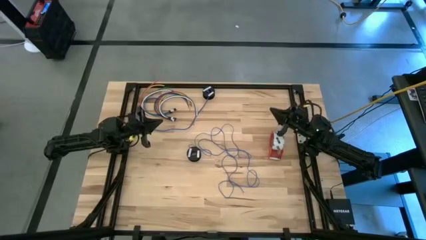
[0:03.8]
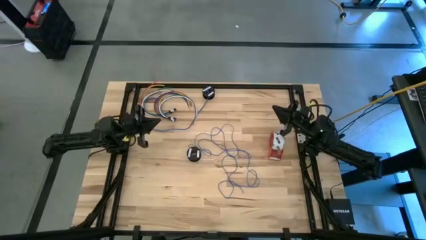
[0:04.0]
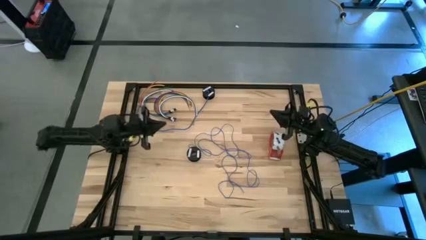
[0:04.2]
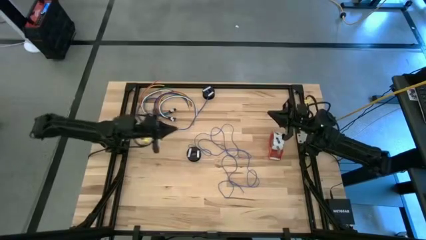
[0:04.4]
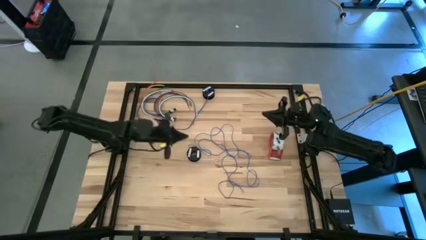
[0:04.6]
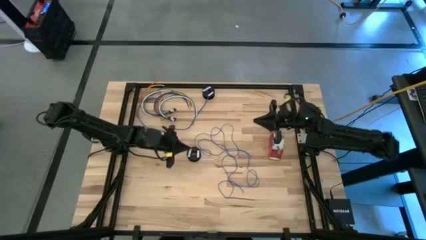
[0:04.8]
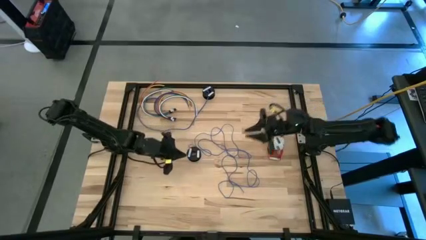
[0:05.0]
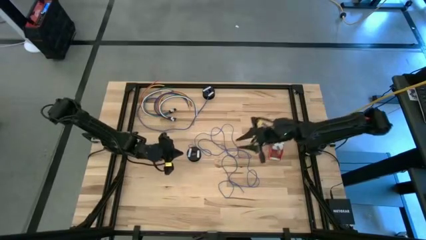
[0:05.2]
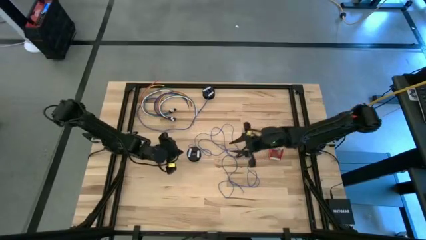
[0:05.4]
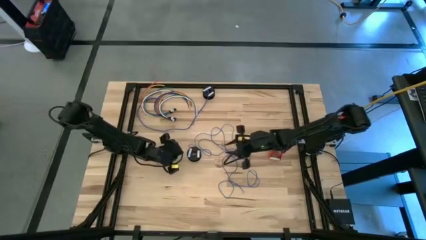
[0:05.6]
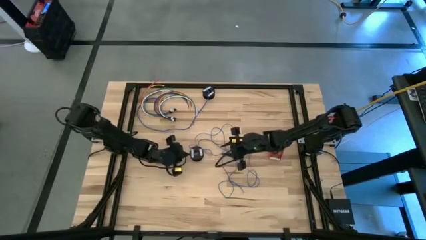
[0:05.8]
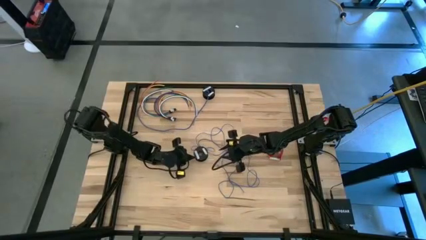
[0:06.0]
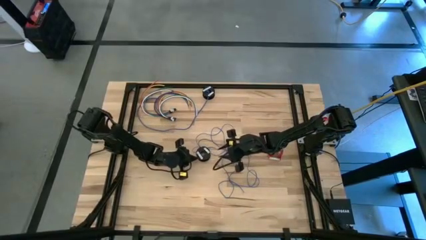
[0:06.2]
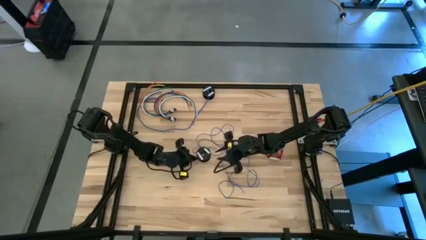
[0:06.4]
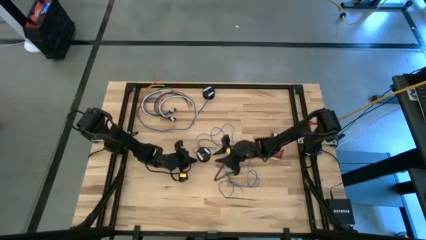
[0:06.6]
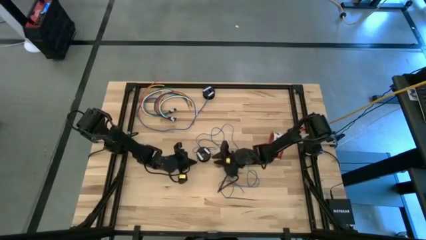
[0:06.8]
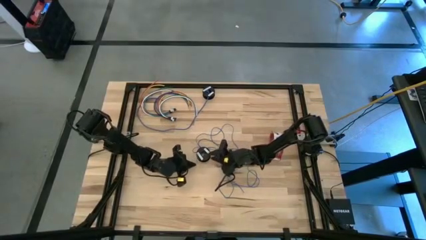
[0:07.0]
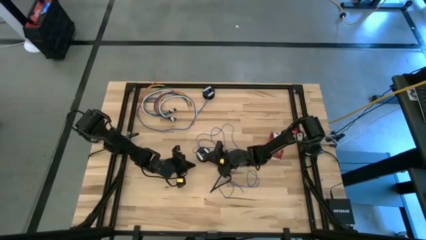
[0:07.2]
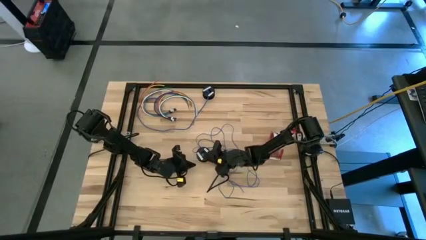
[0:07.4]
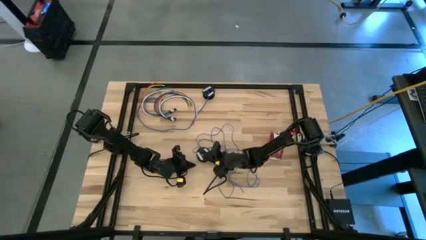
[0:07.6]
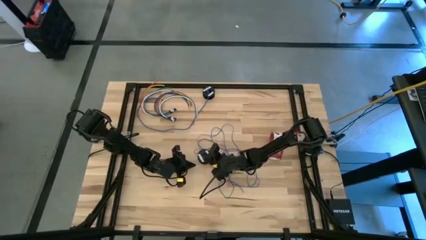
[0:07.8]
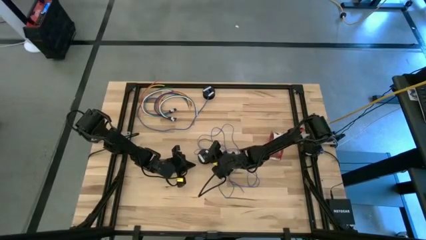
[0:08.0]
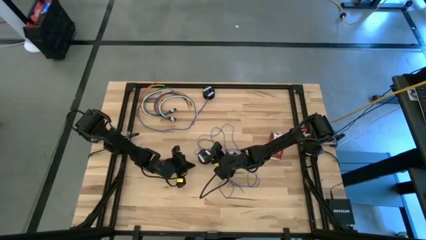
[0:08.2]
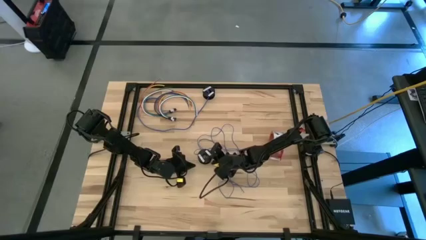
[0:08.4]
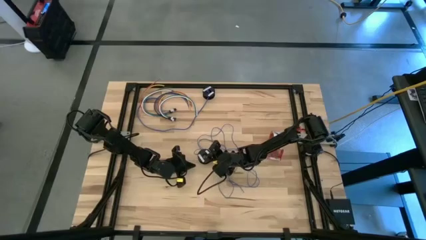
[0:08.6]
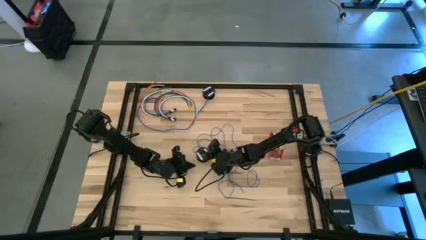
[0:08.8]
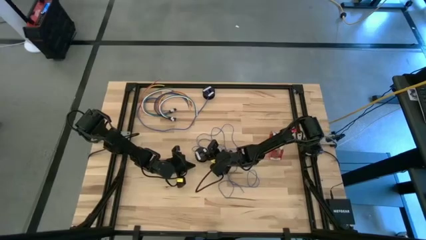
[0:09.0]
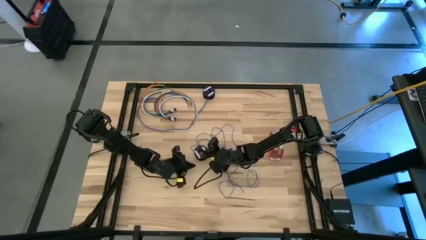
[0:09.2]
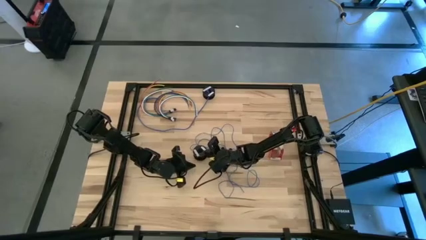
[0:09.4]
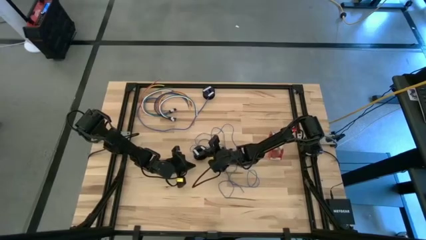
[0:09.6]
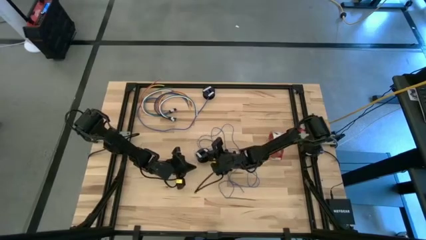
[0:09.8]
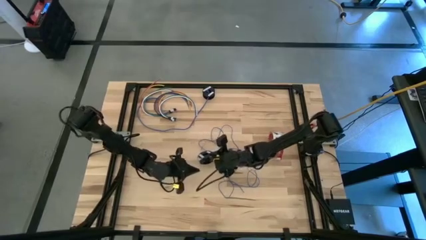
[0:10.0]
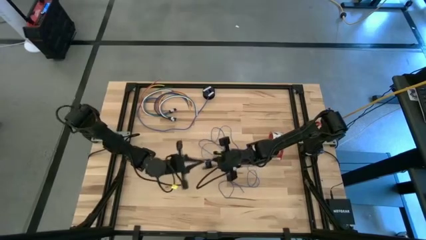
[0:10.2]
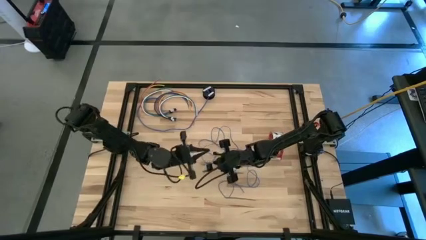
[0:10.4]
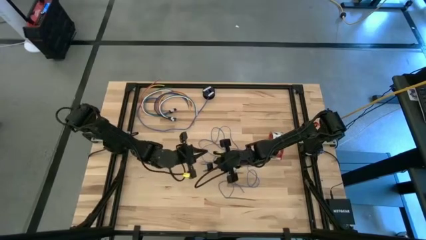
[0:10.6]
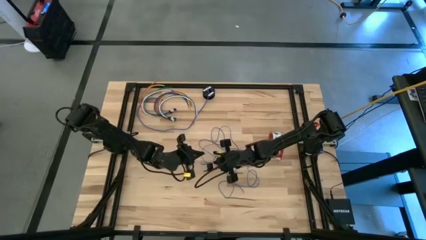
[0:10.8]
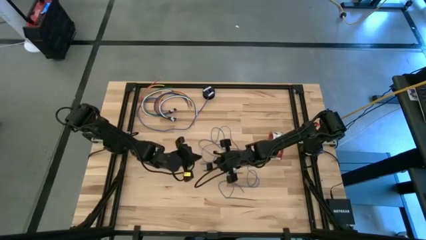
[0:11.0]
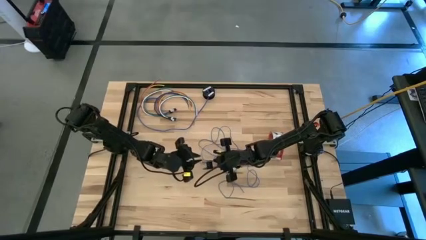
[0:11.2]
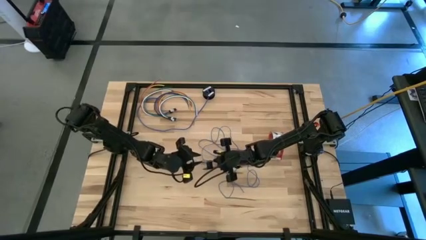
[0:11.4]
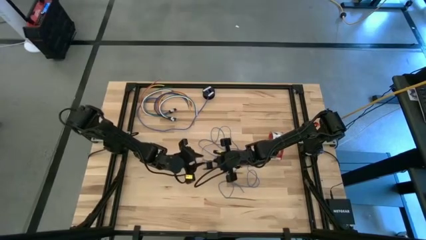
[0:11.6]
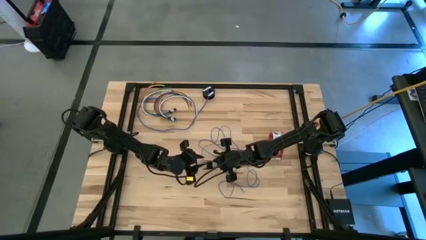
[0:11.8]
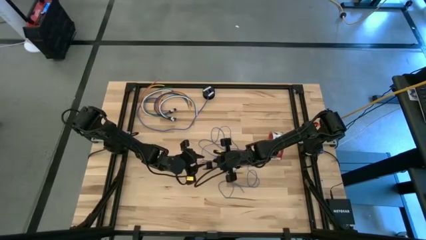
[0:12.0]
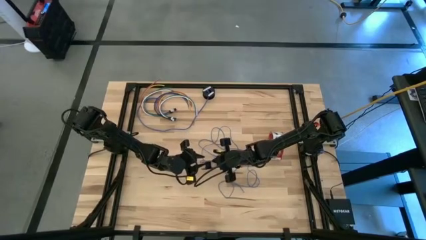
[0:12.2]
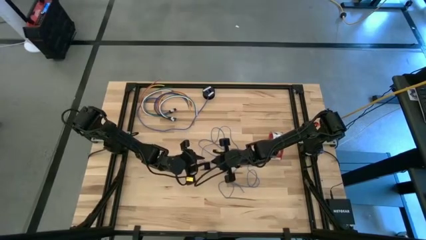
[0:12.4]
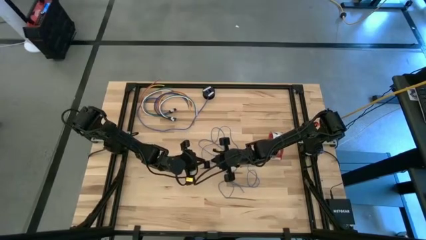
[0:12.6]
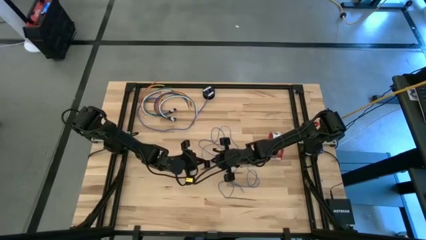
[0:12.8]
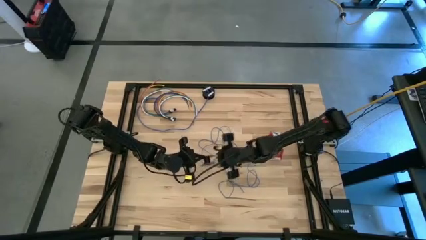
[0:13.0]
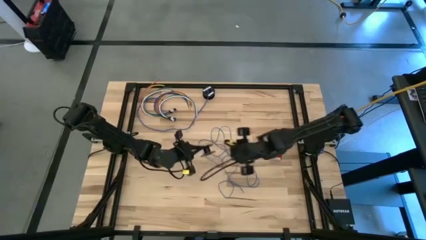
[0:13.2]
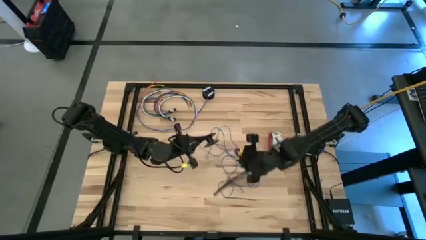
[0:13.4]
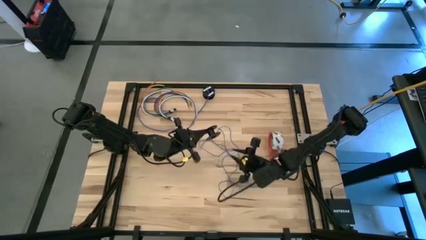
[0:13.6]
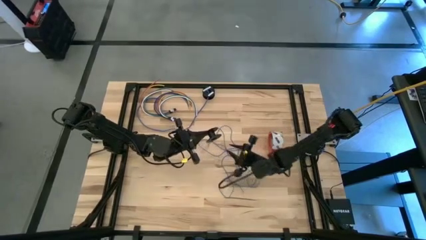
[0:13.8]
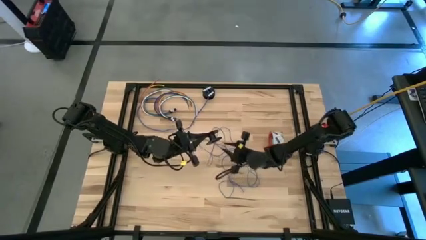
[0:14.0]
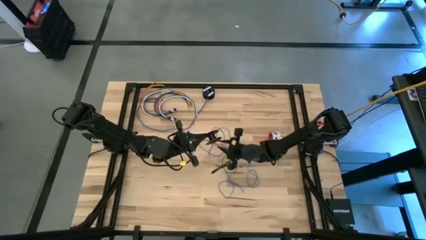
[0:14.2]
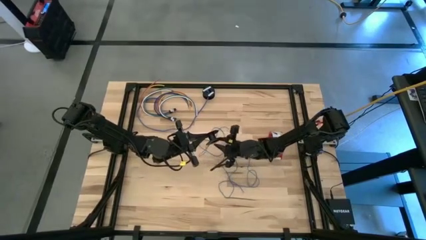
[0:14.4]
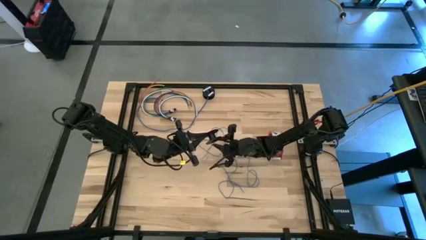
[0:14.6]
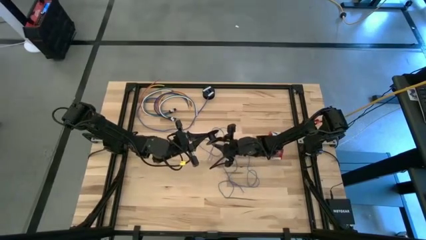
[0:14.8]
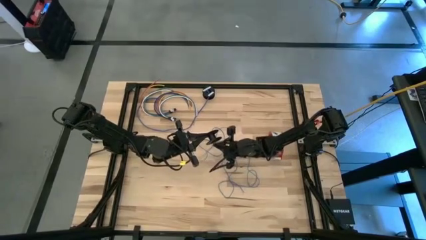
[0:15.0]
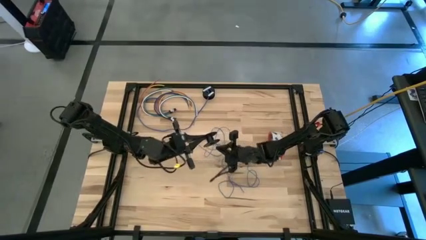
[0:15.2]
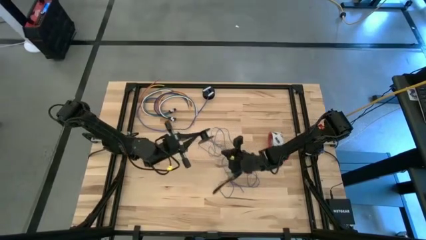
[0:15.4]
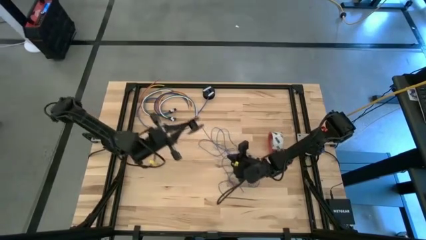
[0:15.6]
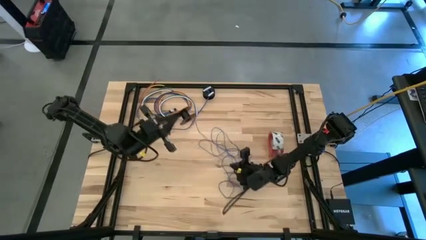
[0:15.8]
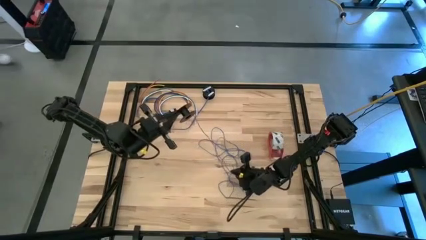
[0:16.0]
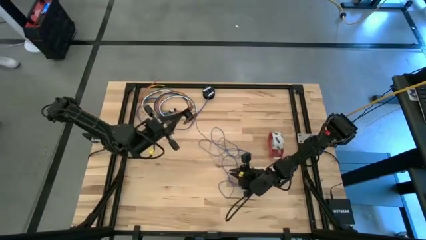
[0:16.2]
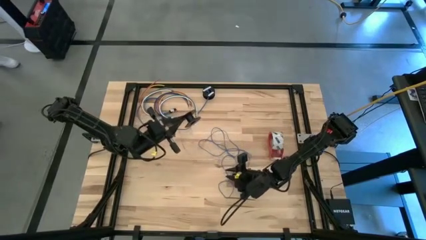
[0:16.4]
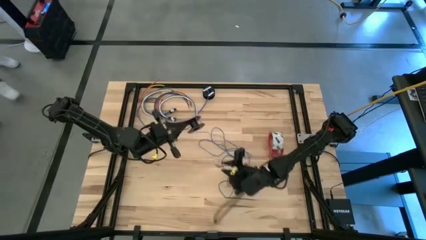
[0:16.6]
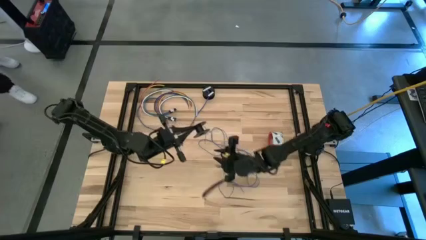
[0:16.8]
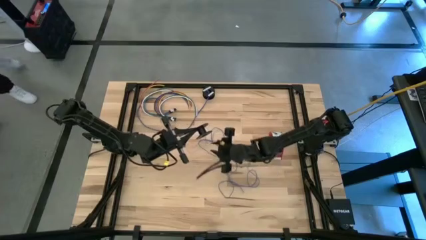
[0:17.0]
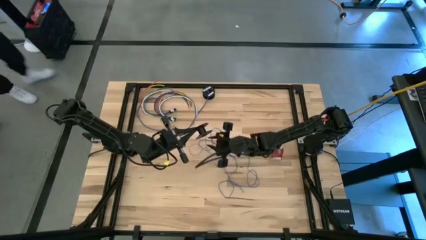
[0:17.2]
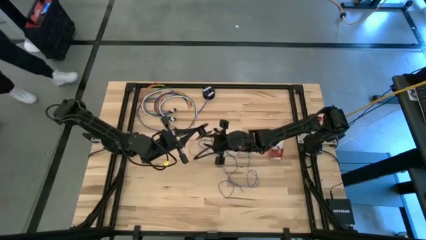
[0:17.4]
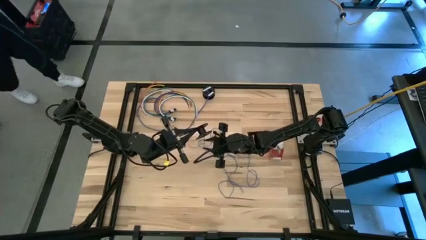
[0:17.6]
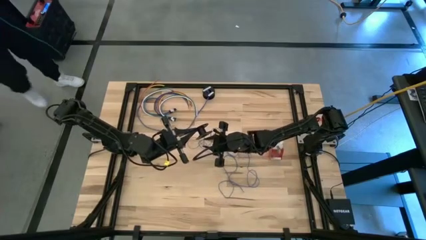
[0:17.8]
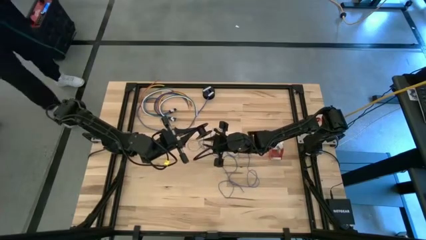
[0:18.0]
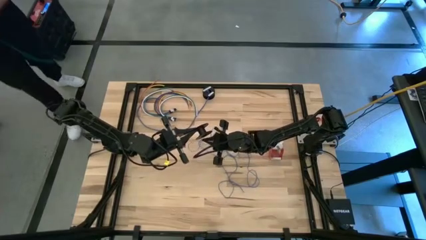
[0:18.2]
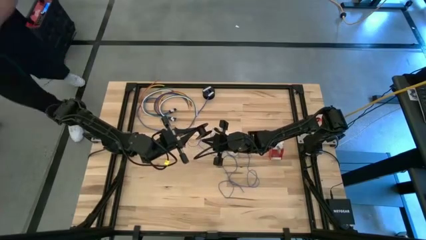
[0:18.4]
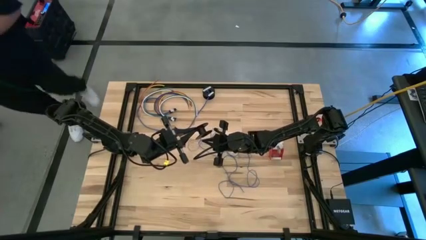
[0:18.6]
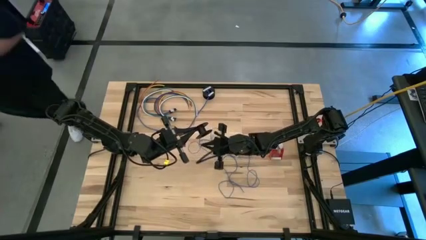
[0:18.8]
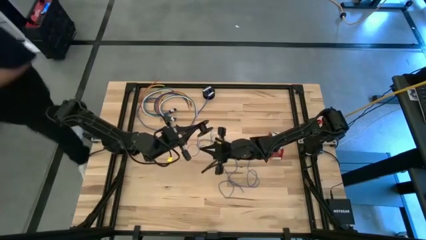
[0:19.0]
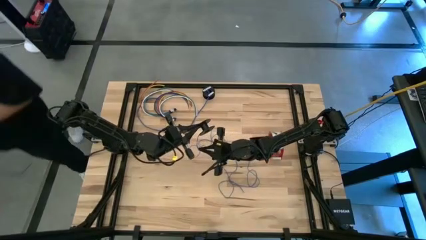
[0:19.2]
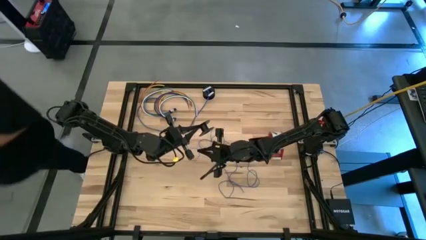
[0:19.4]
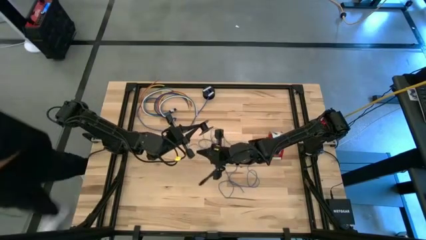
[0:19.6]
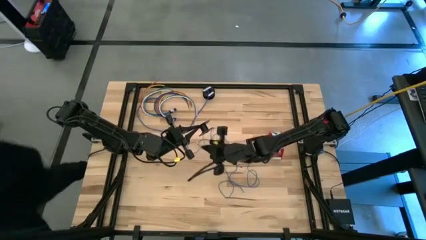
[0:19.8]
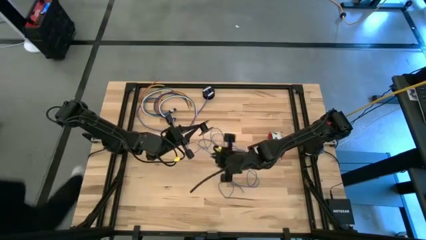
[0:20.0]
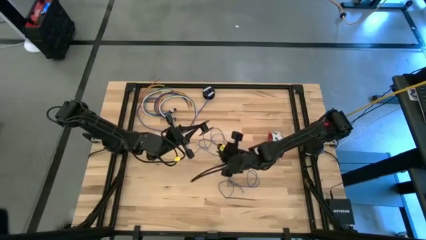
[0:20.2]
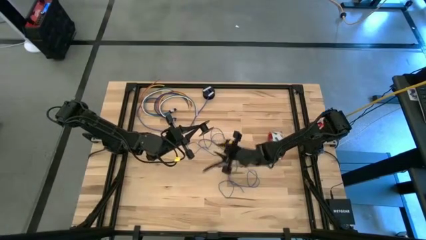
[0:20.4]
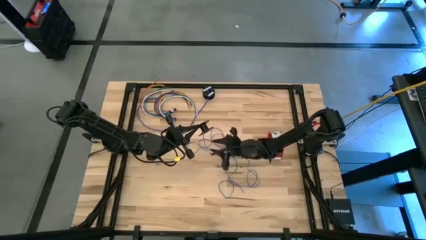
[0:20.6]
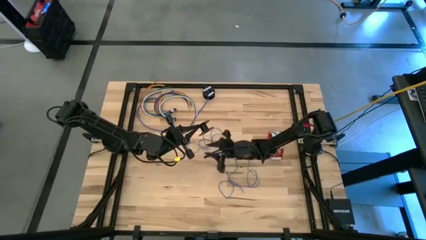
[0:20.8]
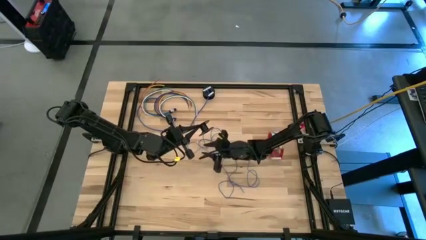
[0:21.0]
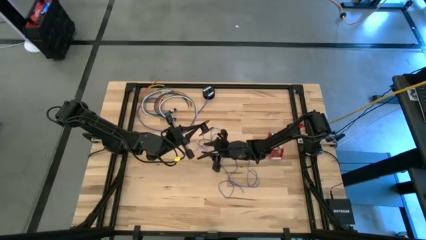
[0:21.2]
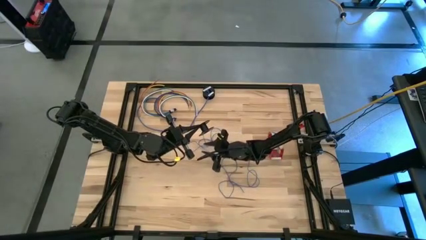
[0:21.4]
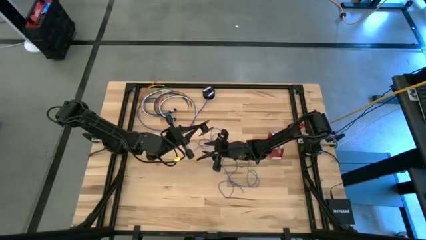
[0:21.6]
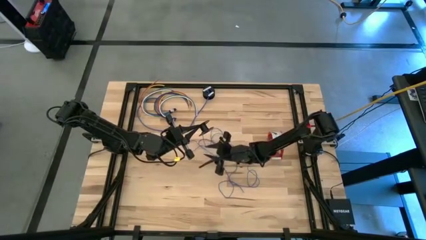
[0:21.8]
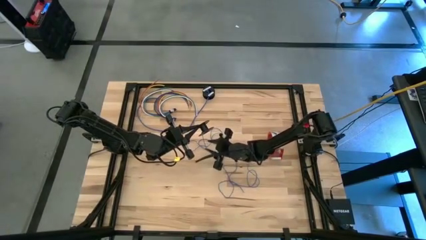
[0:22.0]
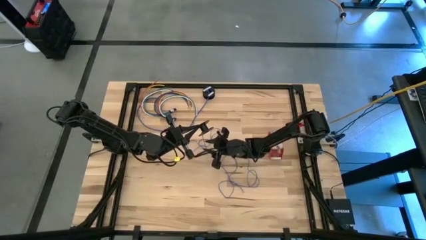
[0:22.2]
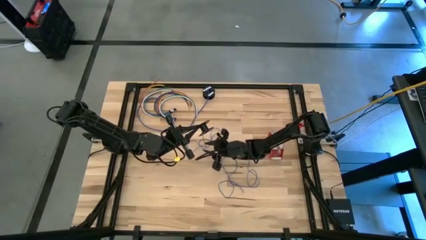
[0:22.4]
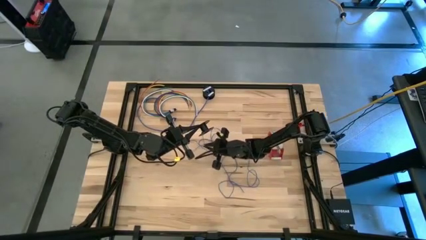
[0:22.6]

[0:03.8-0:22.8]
Task: Coil cords
Coil the blue wire onto the spool
